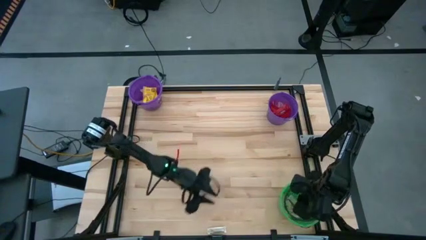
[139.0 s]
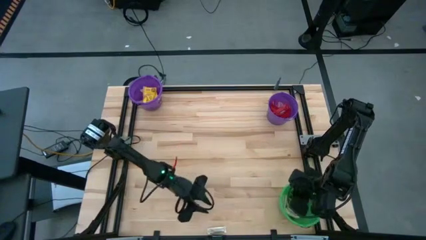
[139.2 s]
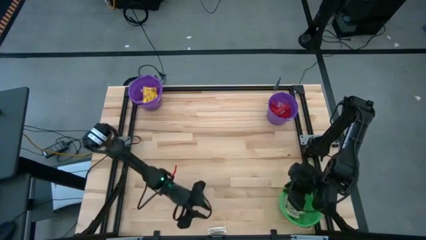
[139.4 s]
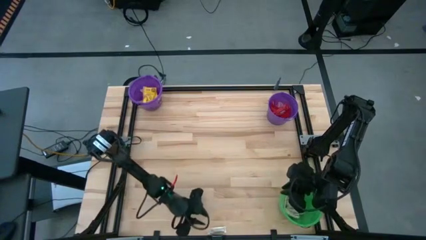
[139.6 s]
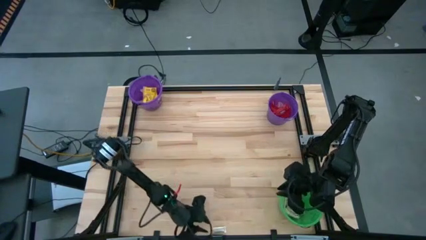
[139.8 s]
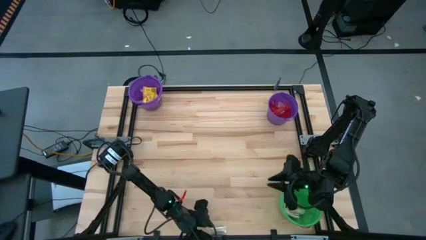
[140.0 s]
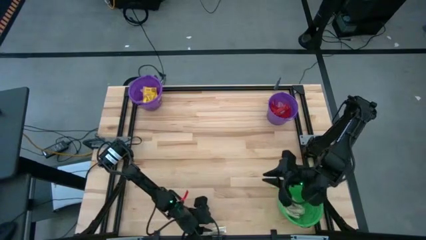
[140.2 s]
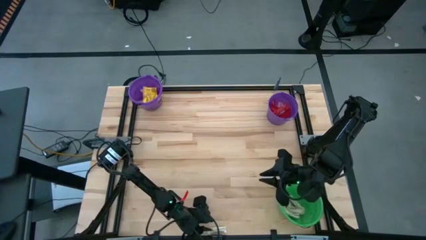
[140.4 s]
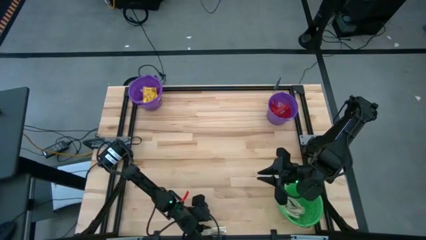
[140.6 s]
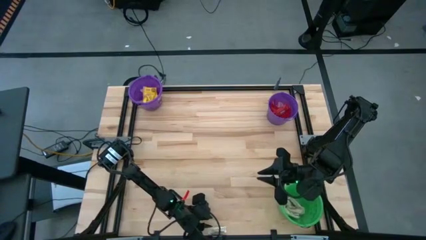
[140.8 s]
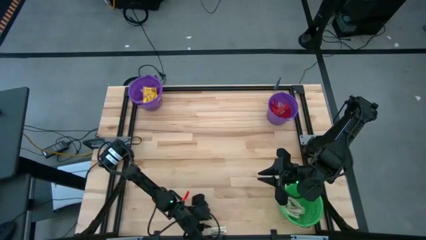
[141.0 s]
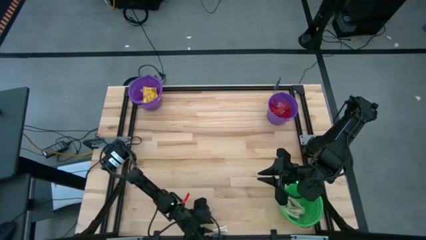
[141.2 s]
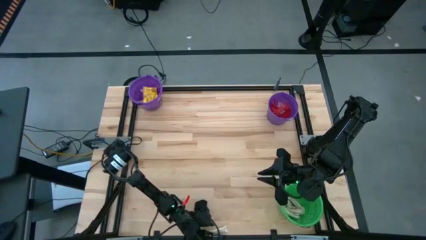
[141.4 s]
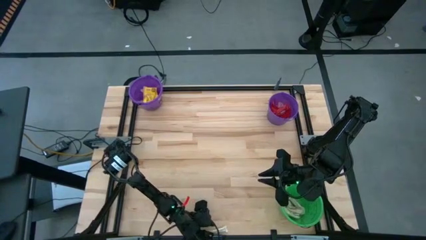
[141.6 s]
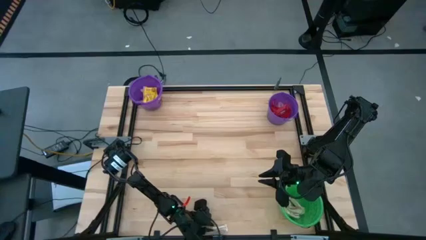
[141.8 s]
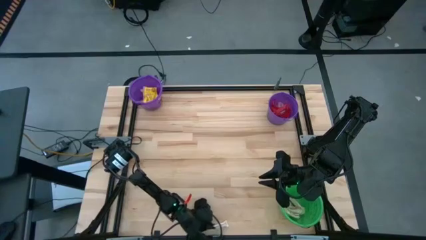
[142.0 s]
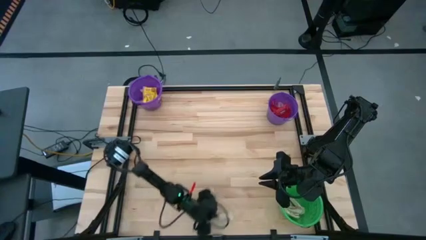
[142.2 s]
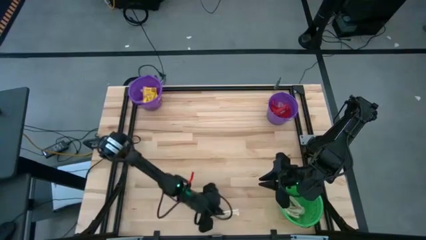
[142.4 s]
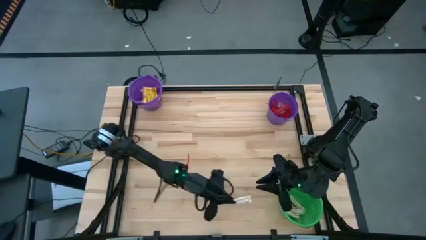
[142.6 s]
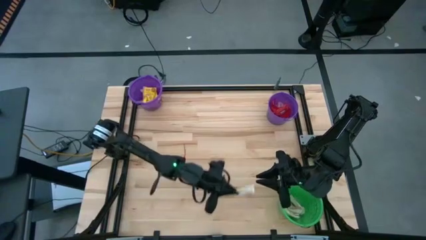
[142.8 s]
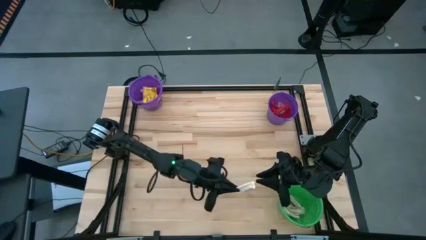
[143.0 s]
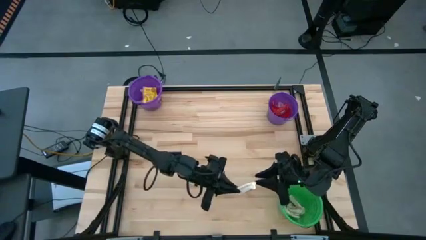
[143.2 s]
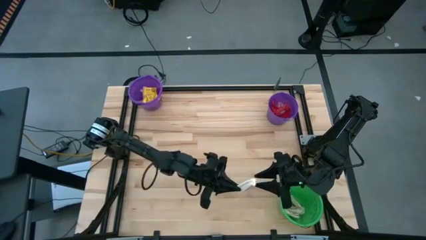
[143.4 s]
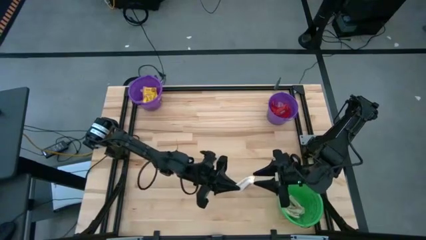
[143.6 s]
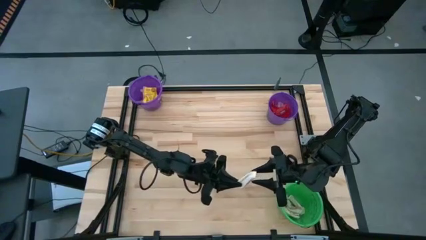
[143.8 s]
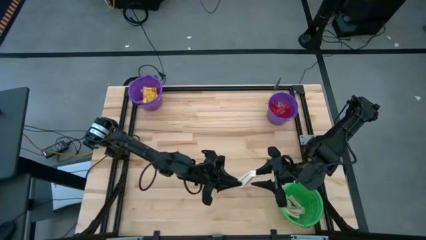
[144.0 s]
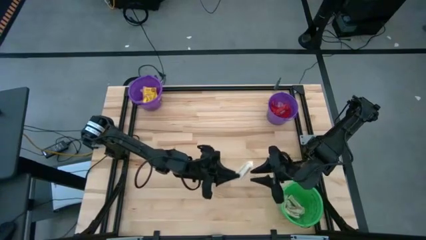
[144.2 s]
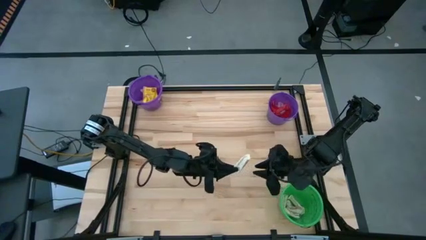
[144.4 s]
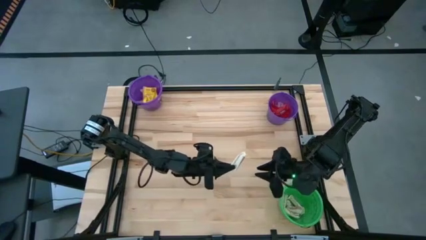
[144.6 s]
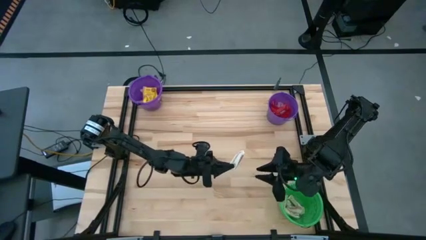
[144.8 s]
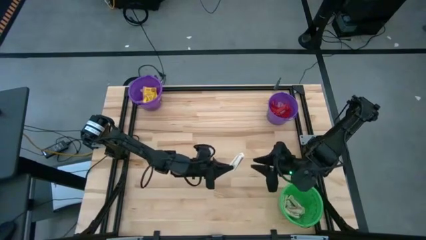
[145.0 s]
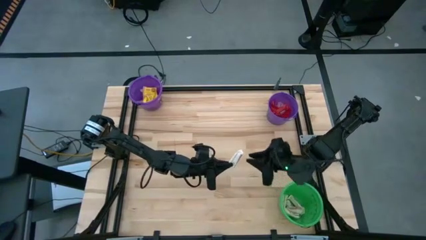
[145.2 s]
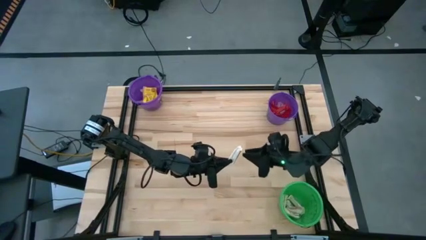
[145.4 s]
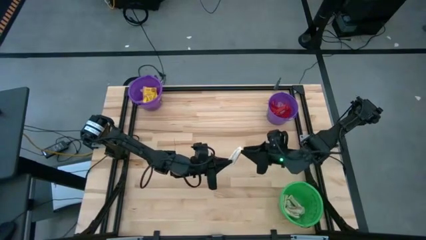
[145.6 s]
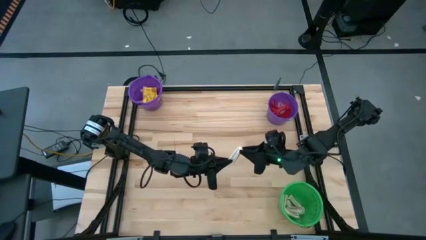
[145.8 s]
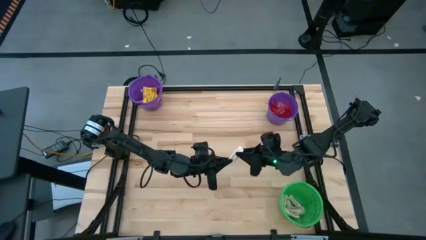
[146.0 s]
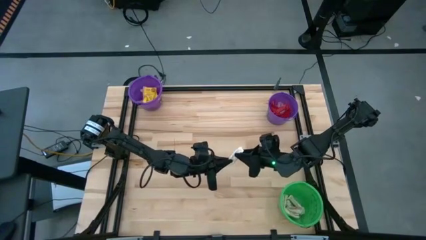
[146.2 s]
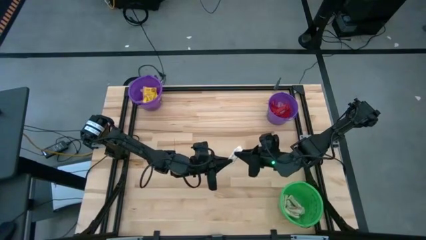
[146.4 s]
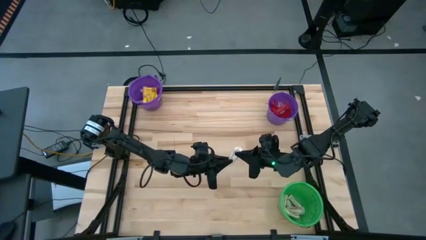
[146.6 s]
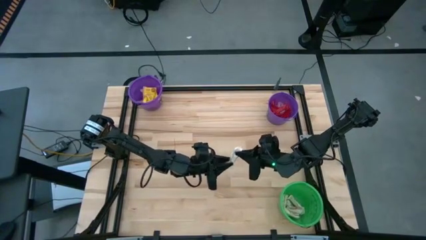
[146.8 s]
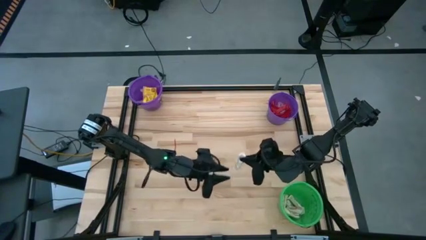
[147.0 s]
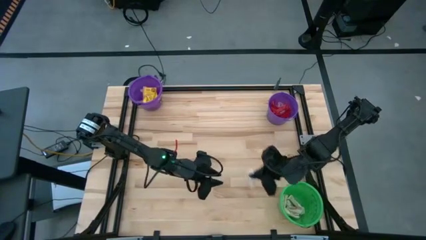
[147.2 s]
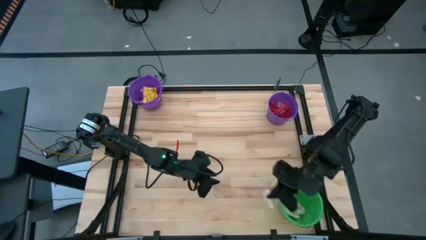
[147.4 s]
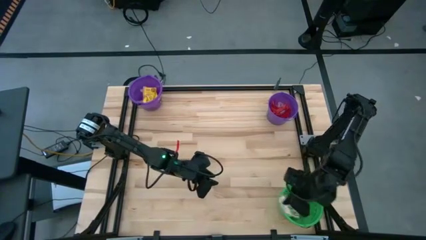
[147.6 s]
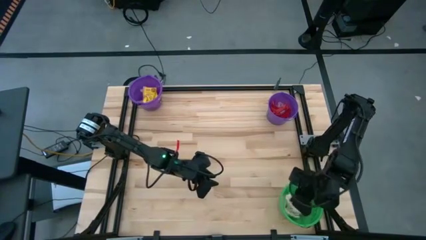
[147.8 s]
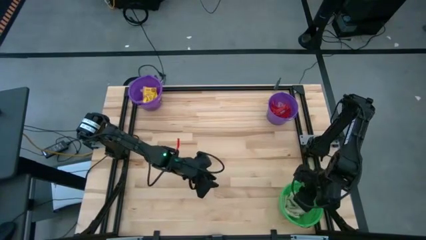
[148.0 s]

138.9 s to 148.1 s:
Task: Sort candy by brand, put in halloween buckets
Put the white chocolate bar into the green bucket

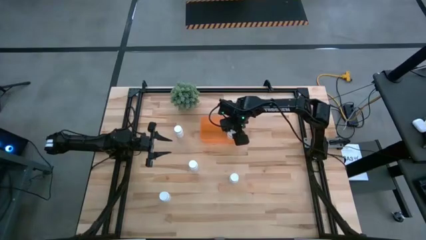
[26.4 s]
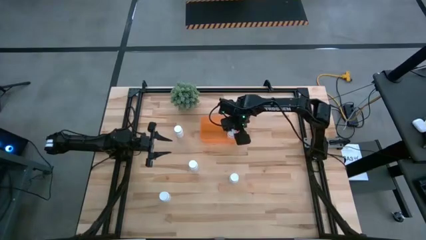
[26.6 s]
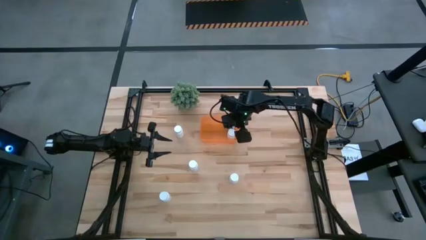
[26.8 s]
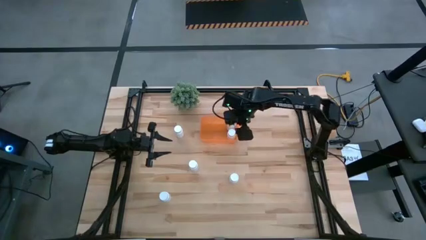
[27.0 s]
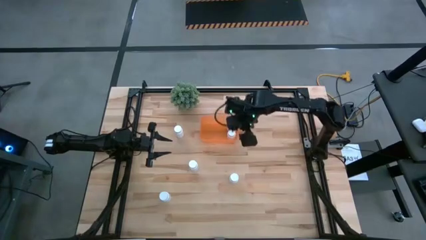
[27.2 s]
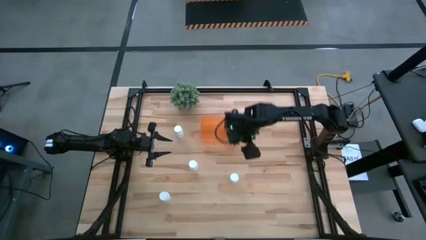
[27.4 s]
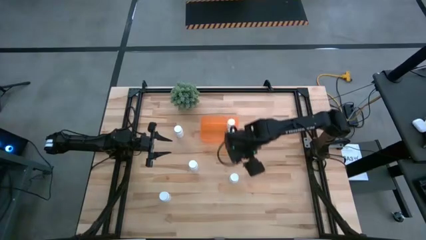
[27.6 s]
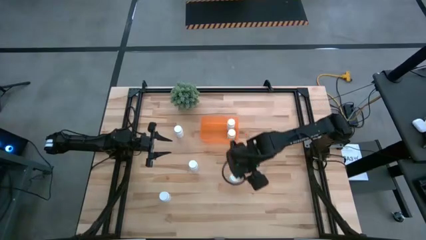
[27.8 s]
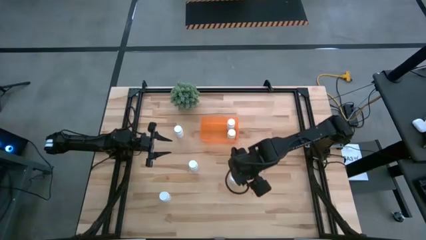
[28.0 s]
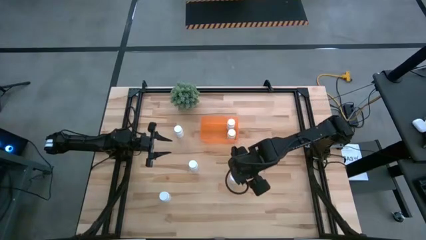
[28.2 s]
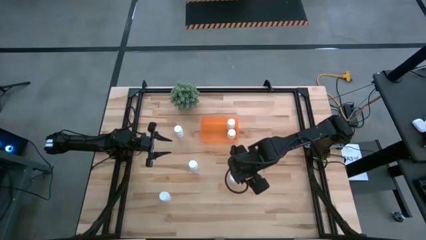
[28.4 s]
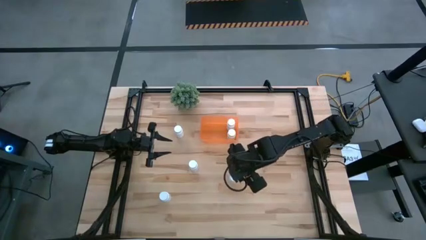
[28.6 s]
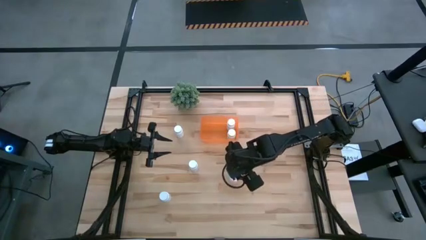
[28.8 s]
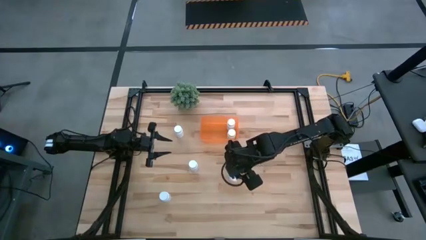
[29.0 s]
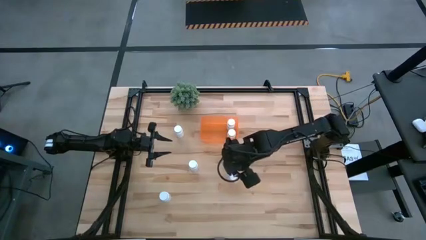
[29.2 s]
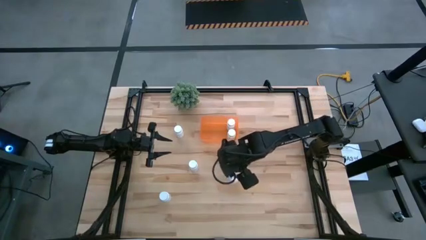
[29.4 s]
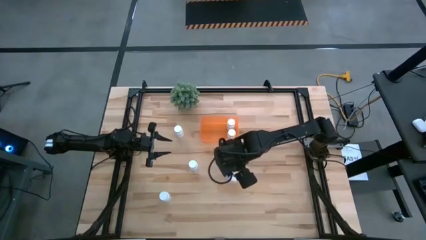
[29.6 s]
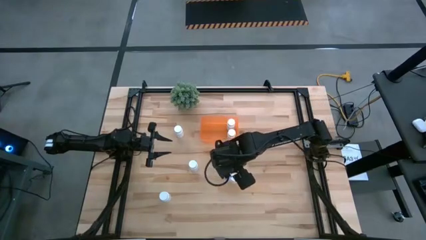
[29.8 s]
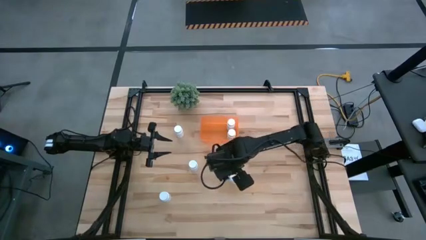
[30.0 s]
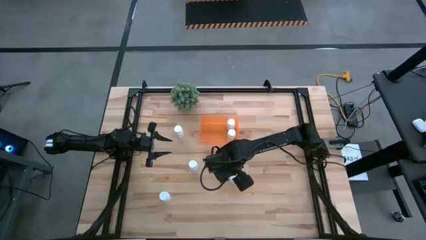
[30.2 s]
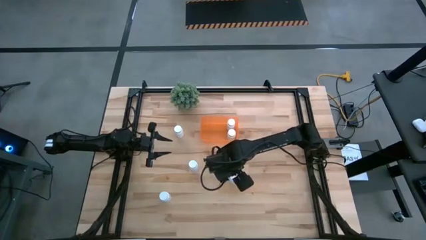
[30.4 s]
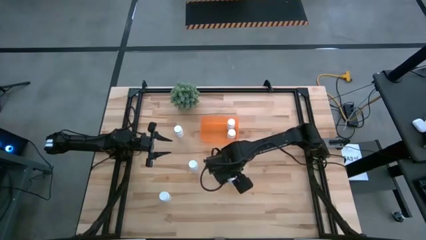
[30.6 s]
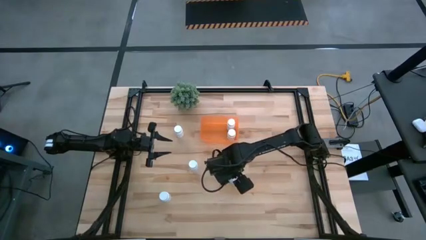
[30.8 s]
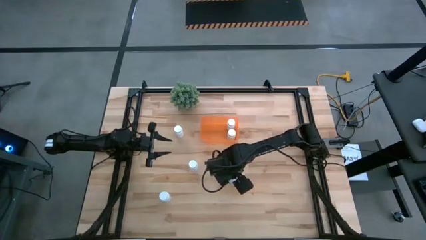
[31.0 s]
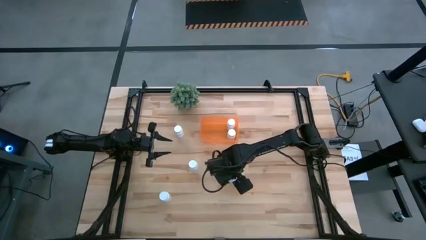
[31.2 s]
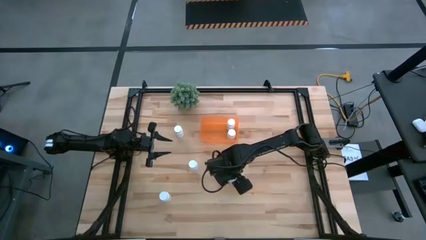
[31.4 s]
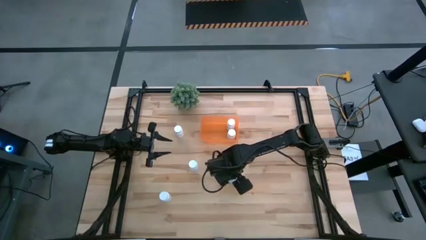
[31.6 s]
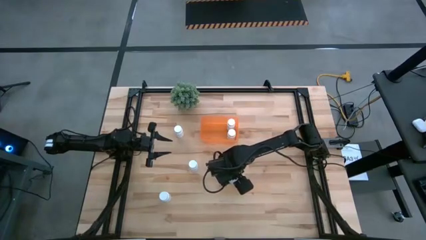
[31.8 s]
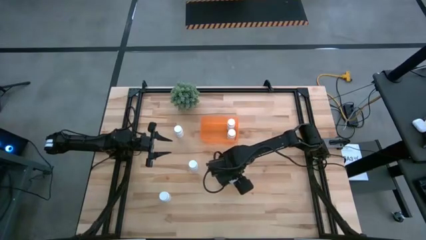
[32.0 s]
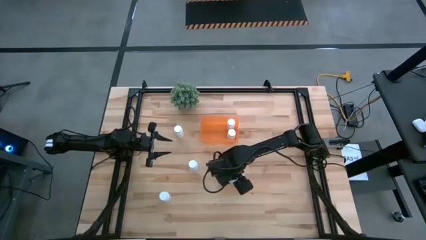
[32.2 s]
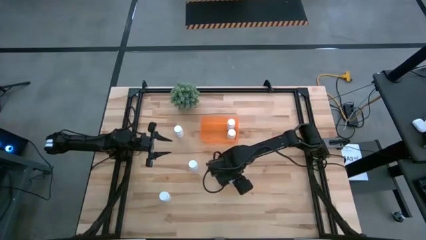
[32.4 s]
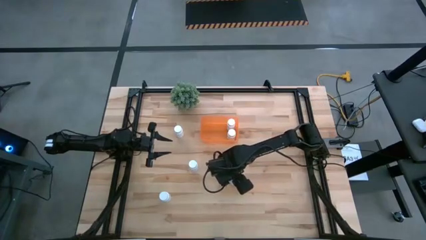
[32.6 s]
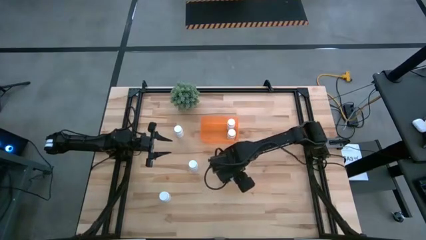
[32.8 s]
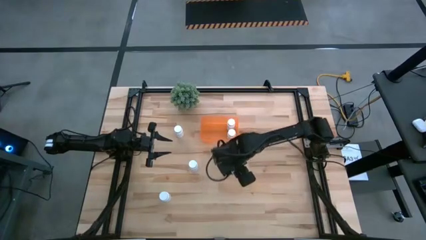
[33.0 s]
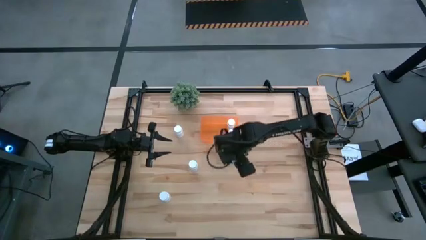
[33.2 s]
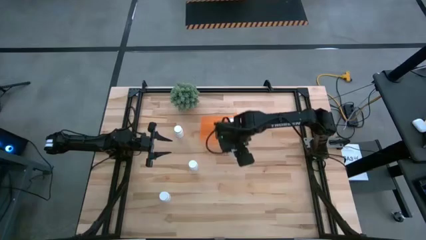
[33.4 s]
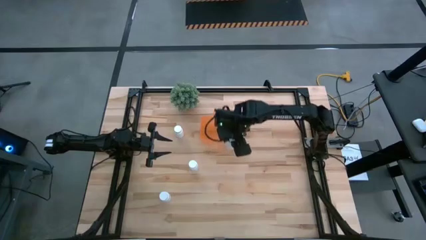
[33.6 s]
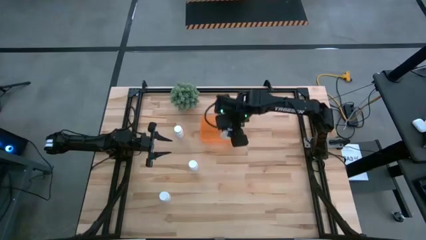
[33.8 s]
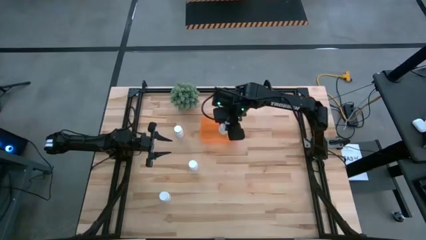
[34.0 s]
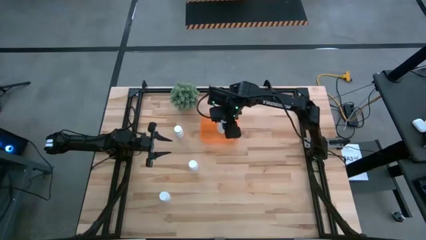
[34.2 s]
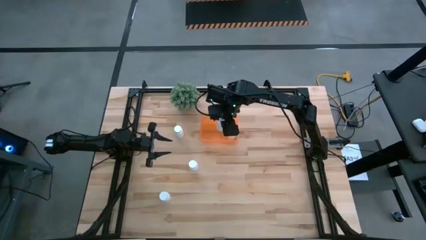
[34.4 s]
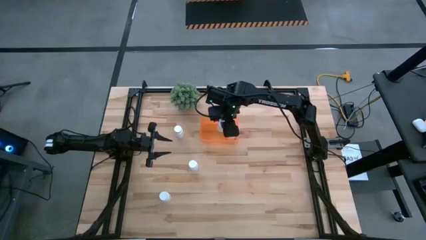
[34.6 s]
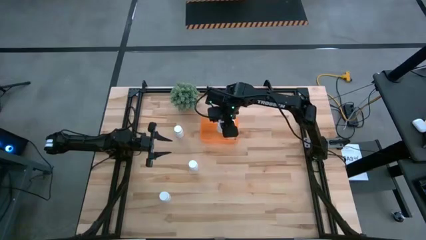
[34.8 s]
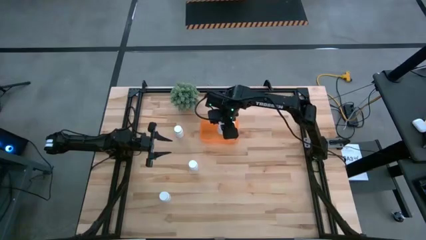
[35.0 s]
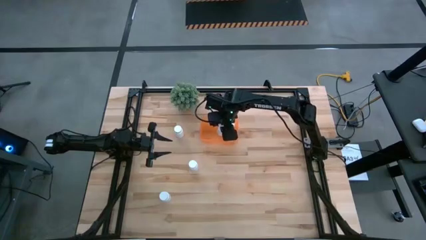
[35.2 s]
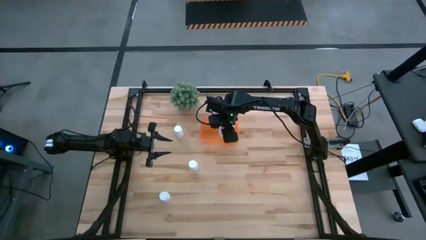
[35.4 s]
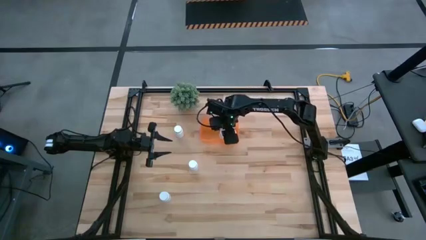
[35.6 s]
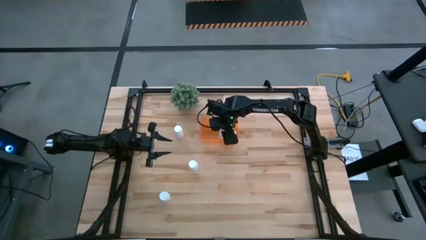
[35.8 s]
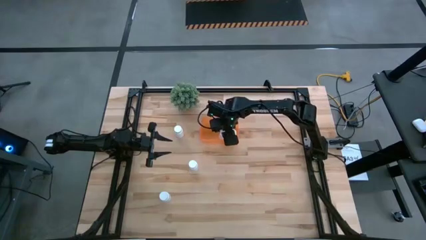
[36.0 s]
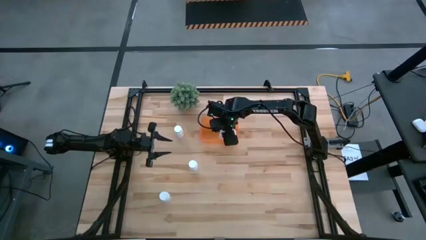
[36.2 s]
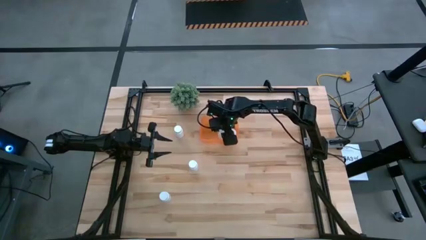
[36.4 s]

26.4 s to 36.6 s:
Task: Pick and place pill bottles into a basket
Put the white pill bottle into the orange bin
